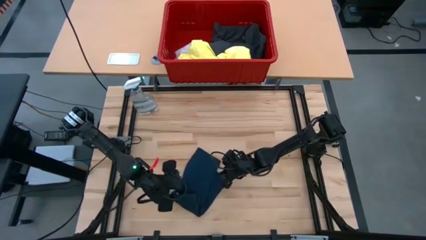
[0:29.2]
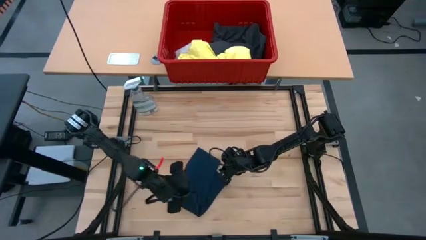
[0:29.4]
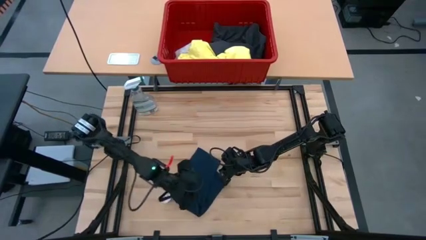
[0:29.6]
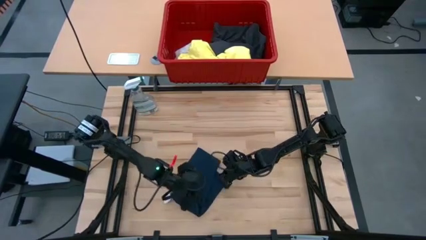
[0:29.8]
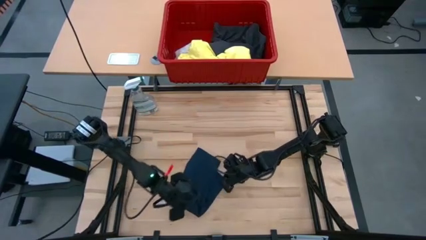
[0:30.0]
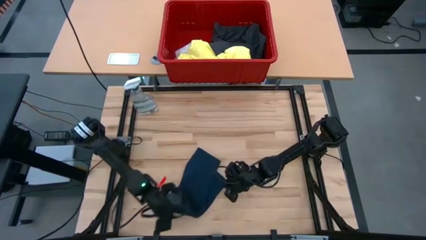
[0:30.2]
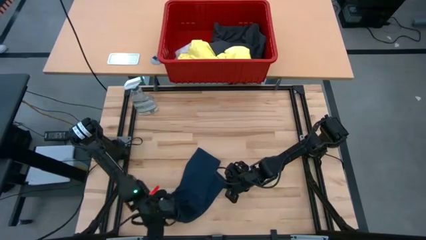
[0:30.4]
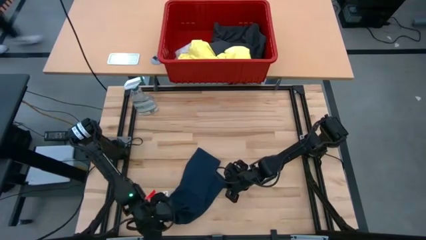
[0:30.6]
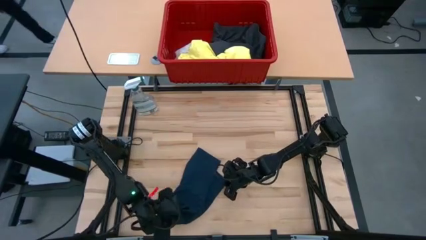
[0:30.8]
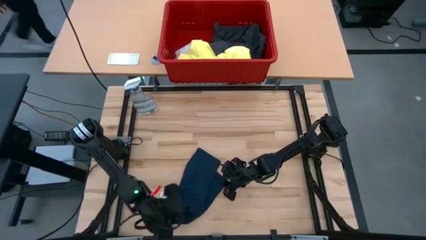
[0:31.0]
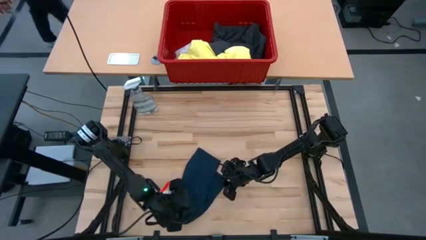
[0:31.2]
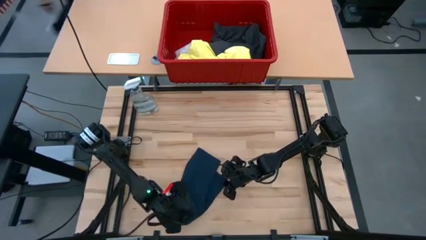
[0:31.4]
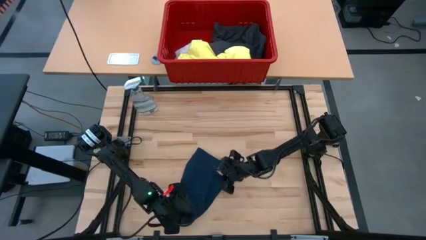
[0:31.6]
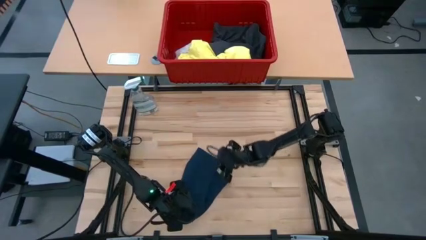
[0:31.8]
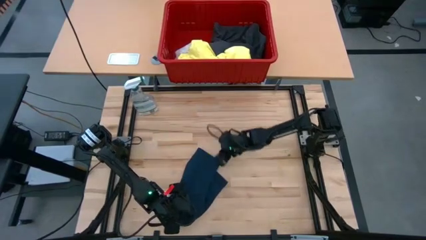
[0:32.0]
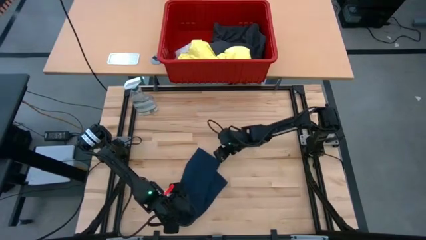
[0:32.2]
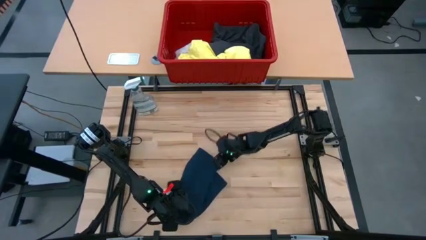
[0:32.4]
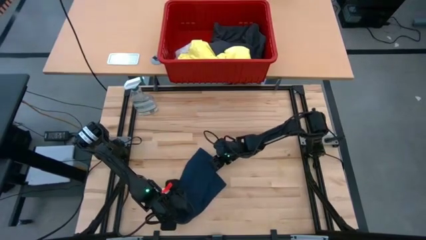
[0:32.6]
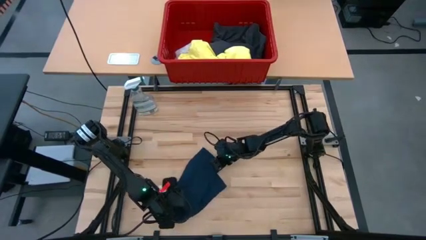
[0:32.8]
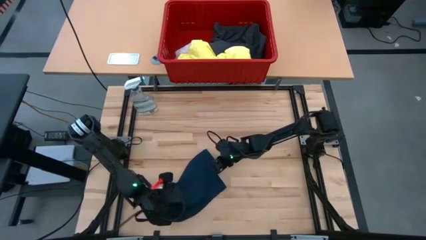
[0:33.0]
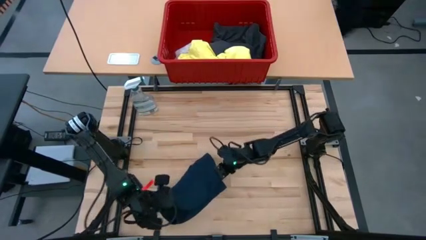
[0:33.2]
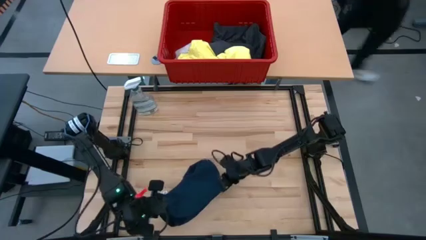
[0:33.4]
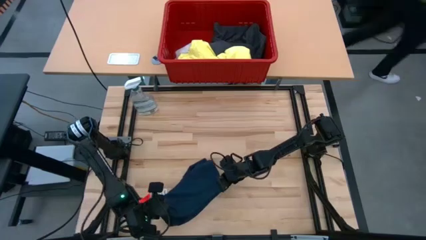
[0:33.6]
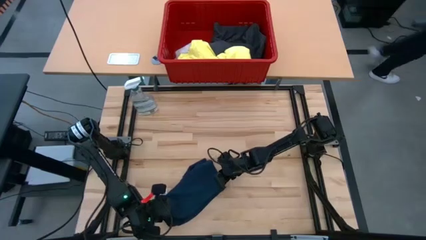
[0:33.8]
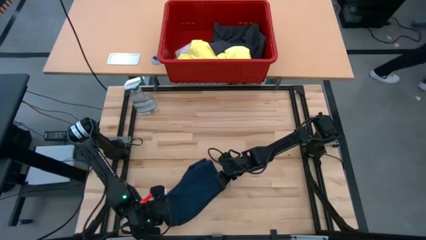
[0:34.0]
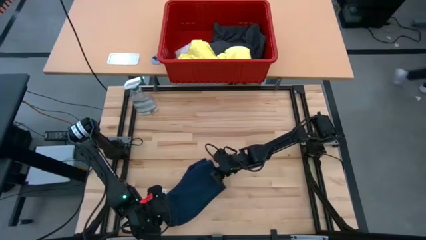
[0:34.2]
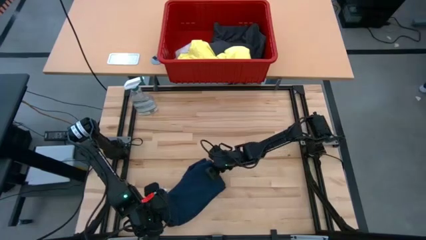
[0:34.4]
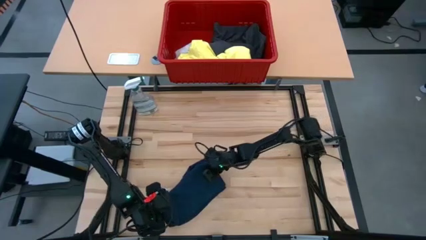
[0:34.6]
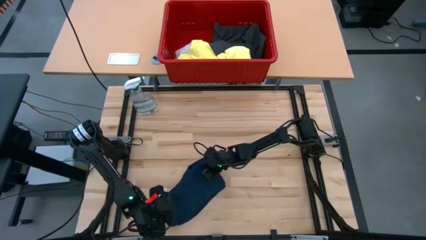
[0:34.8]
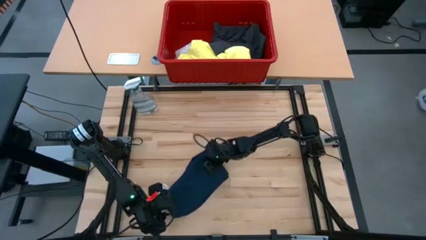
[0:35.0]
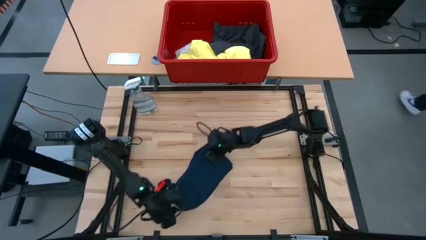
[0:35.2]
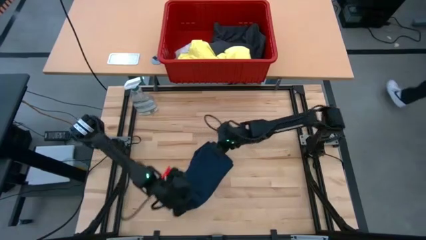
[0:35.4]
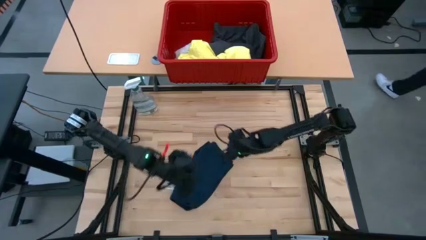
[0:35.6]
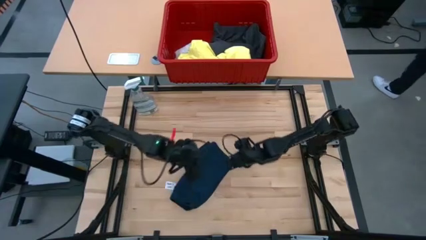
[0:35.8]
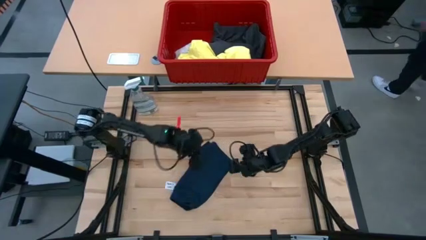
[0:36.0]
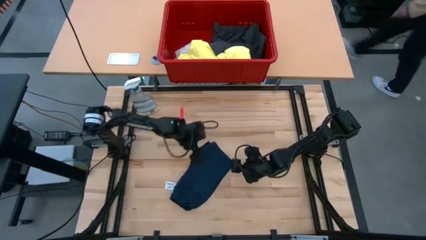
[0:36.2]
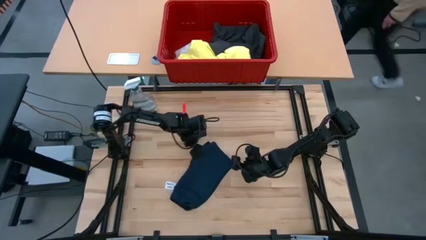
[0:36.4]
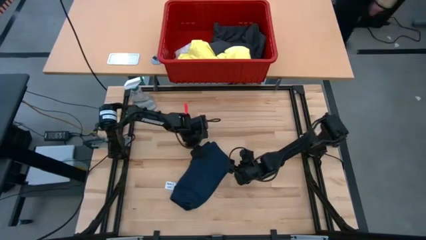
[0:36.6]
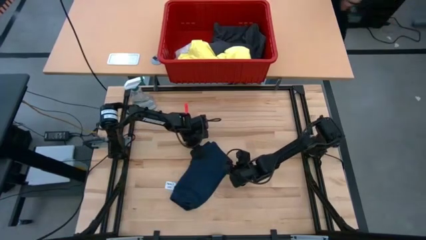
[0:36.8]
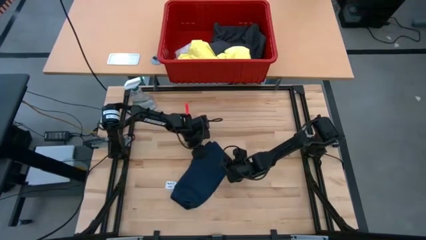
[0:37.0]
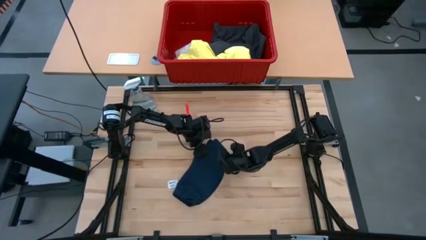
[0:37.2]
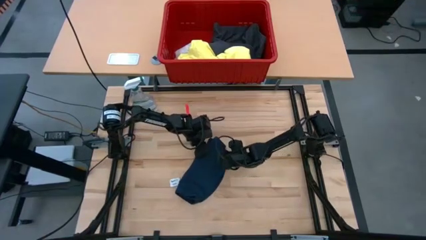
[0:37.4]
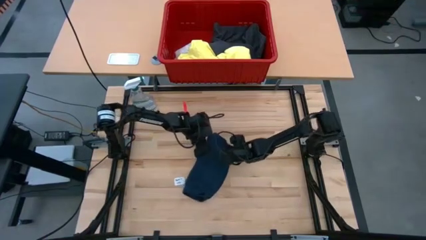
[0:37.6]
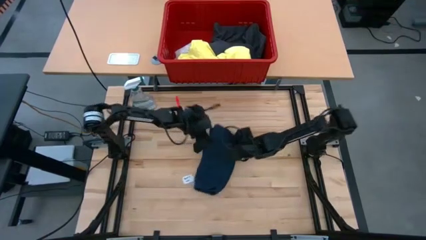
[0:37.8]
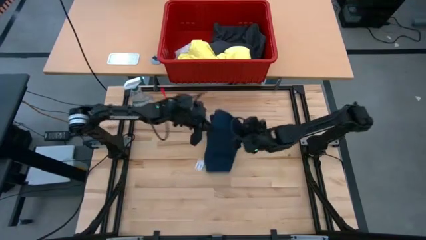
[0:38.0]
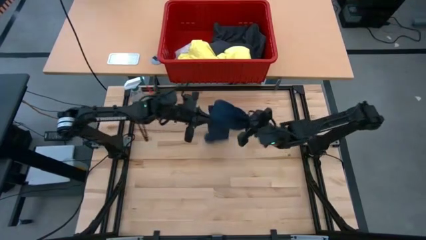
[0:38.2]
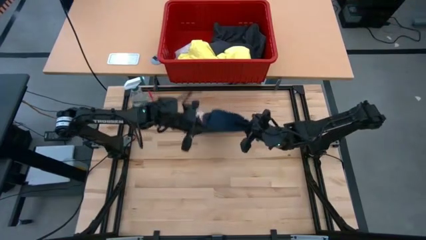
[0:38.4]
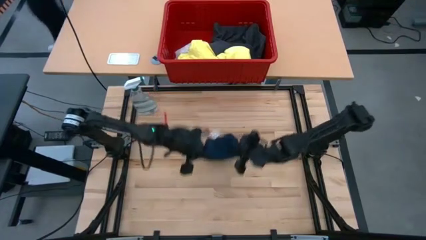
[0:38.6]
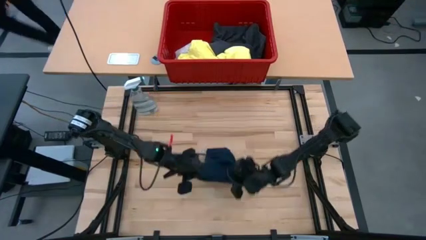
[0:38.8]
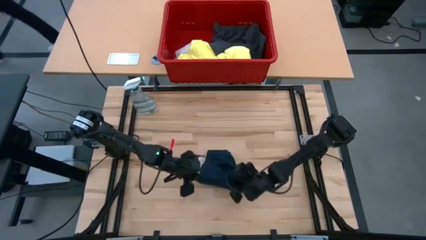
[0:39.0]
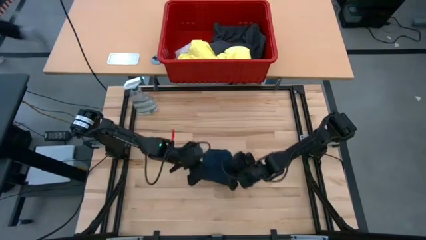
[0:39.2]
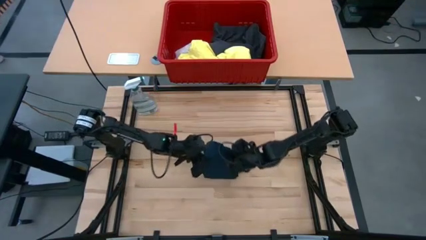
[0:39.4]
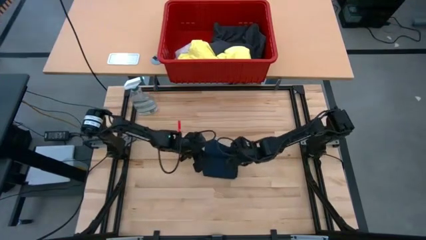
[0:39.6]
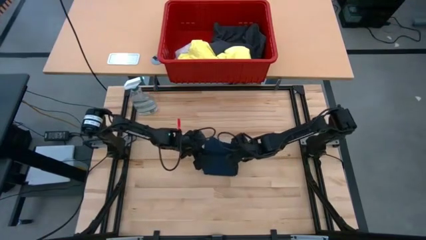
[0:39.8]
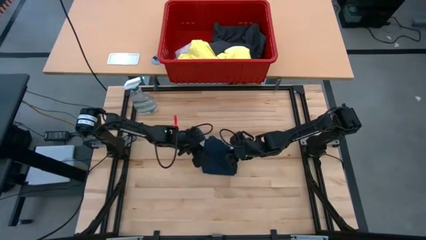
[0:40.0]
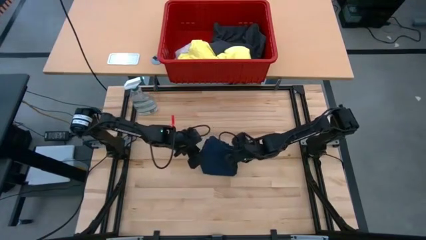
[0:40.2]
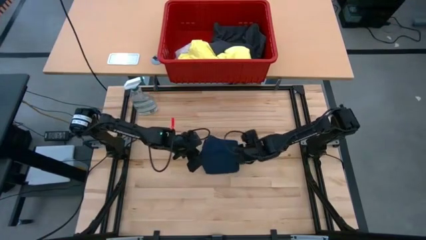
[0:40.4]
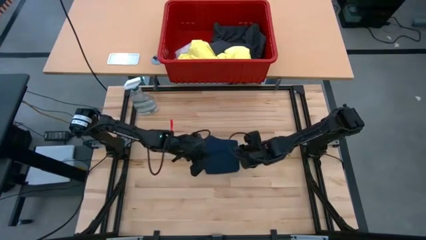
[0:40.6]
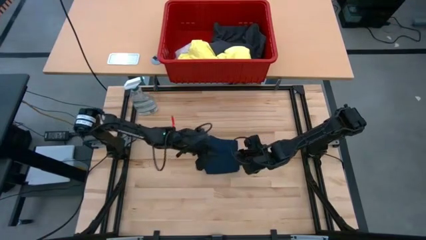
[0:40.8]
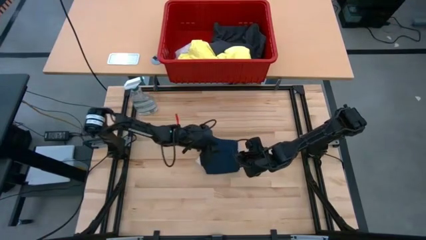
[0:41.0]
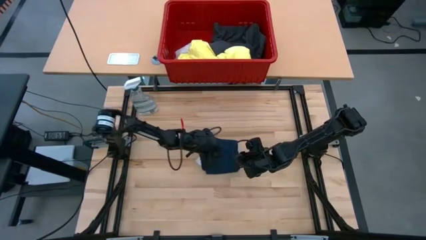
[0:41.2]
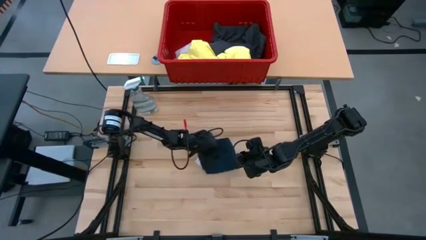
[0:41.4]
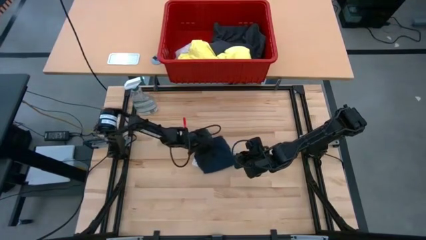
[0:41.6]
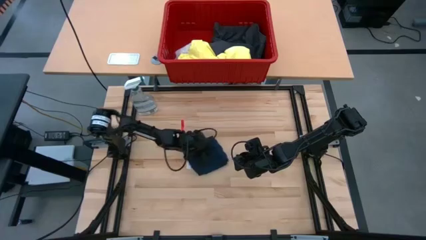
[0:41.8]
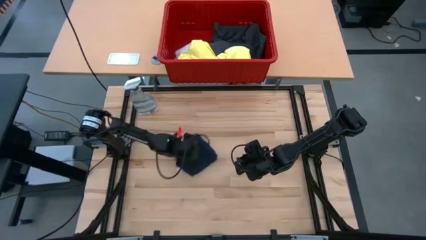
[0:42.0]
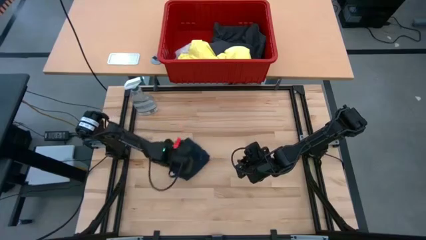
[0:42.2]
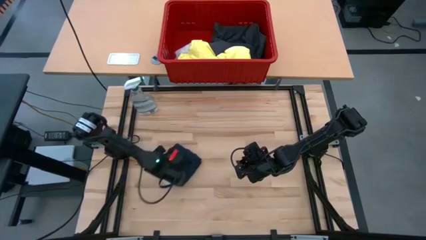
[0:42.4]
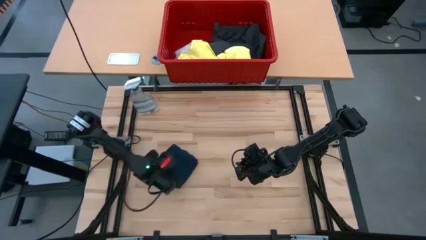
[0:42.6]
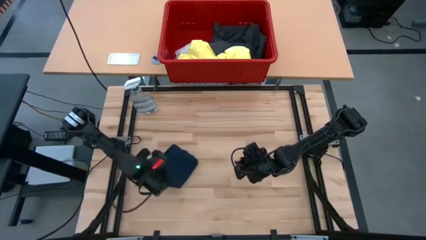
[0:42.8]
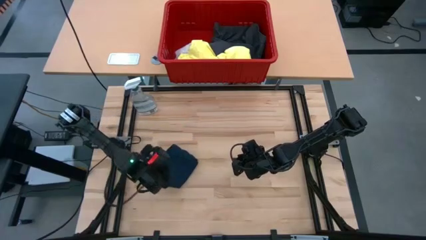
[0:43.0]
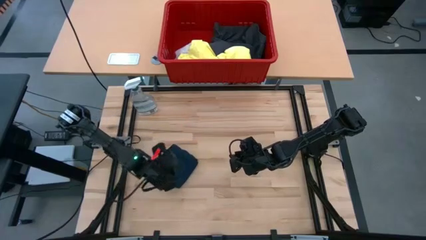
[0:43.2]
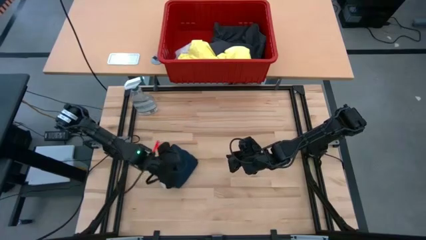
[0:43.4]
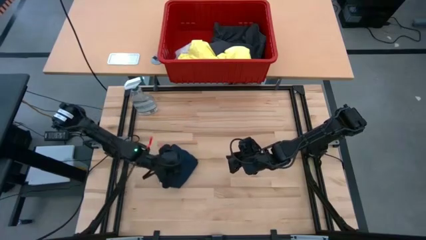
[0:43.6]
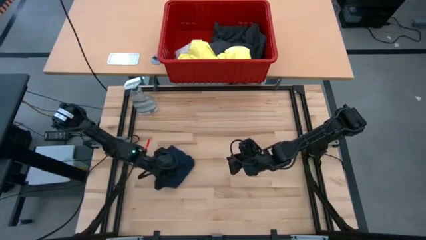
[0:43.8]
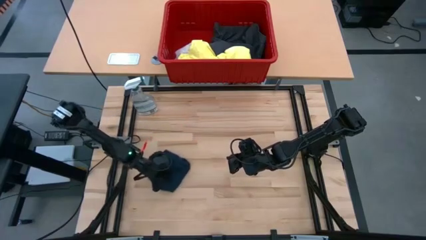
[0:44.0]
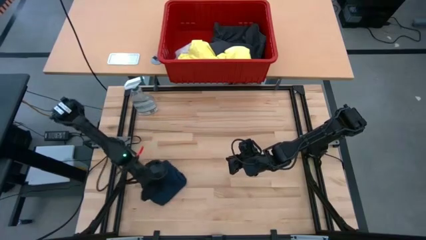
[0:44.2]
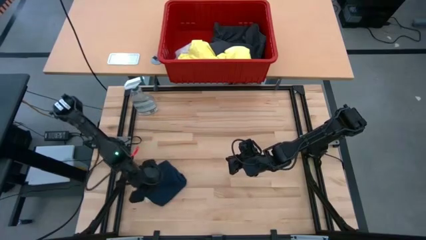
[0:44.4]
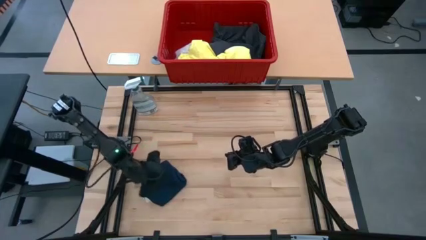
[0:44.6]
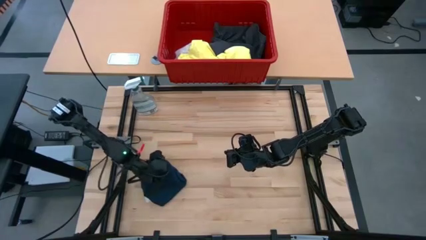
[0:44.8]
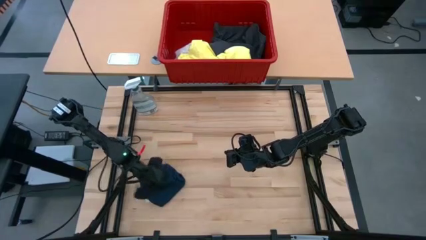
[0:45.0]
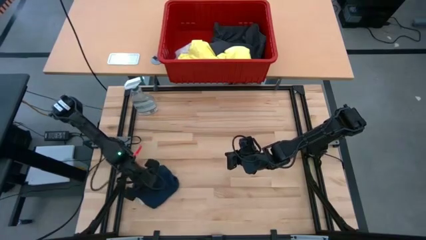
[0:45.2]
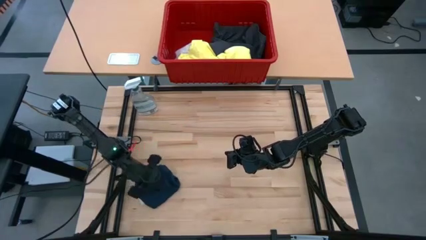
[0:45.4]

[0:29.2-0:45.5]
Task: Fold laundry
Fold the dark blue shorts
